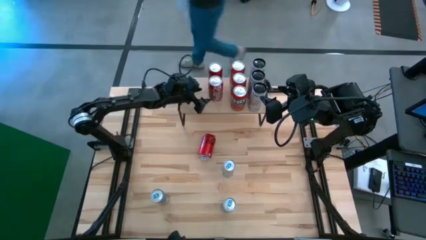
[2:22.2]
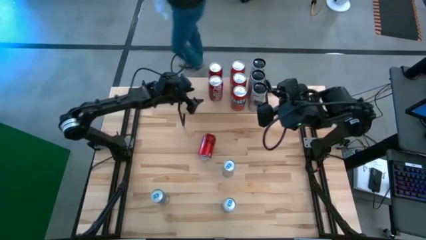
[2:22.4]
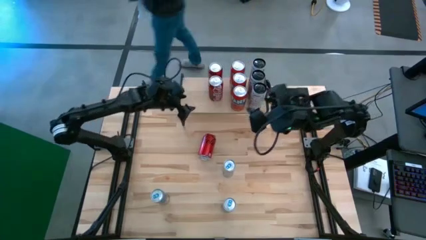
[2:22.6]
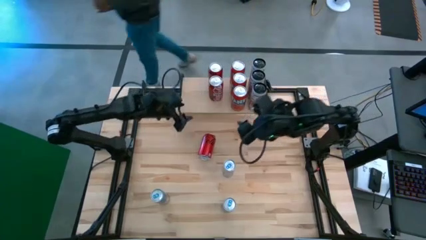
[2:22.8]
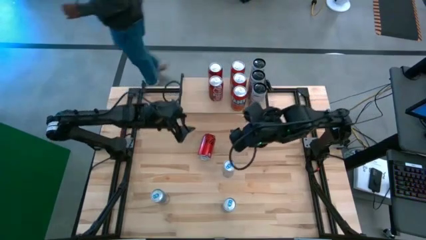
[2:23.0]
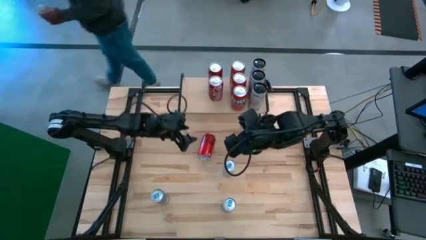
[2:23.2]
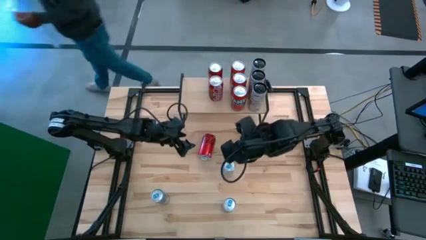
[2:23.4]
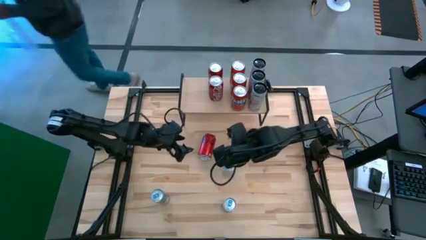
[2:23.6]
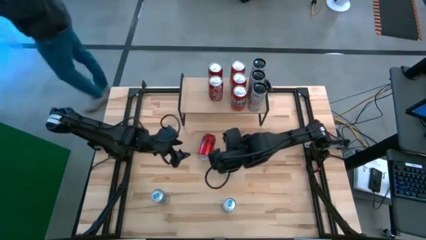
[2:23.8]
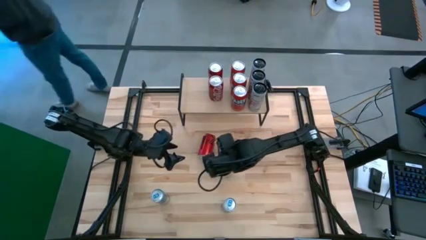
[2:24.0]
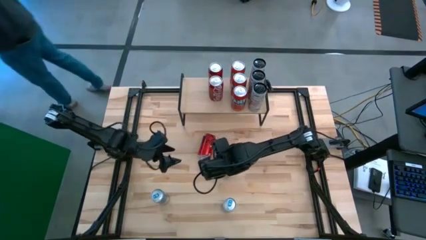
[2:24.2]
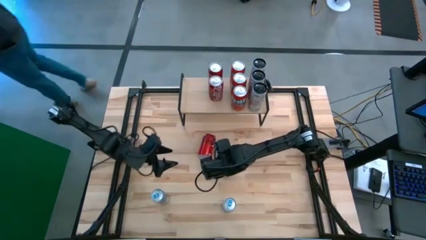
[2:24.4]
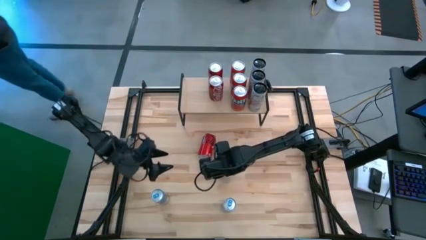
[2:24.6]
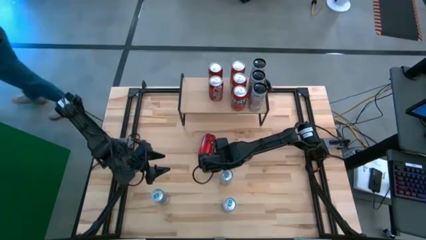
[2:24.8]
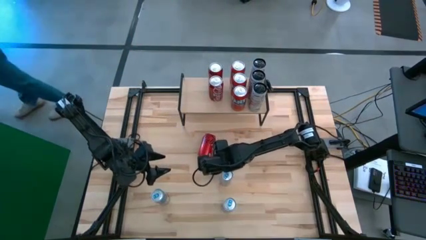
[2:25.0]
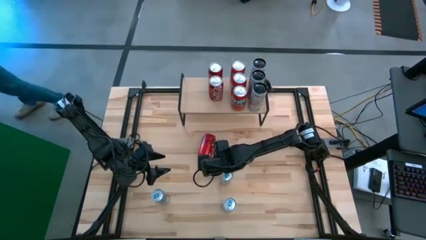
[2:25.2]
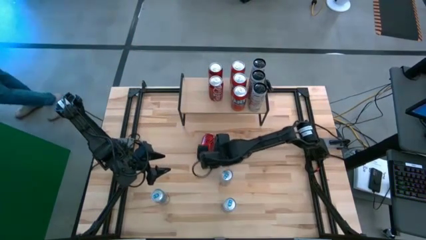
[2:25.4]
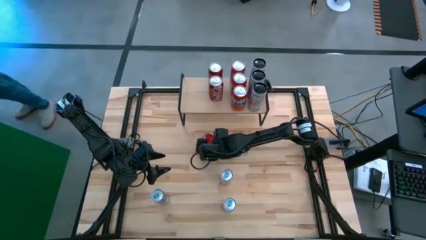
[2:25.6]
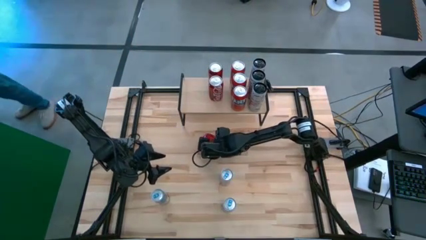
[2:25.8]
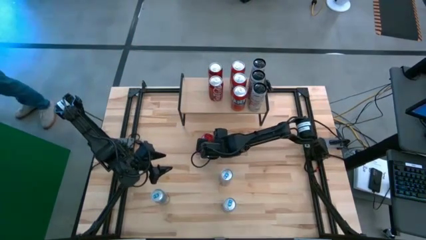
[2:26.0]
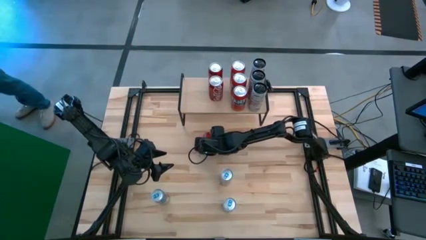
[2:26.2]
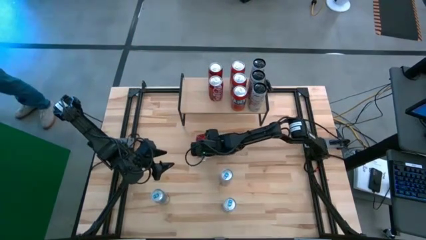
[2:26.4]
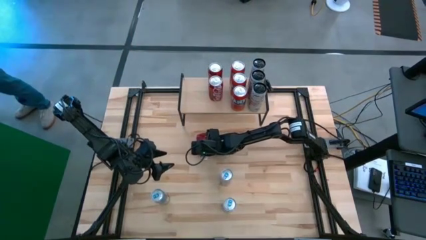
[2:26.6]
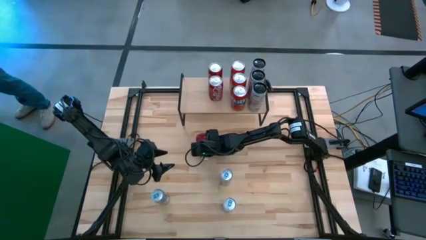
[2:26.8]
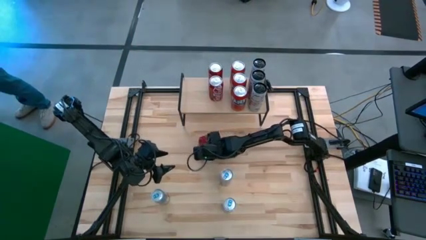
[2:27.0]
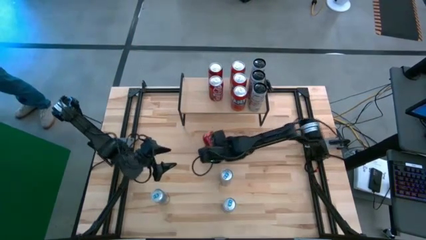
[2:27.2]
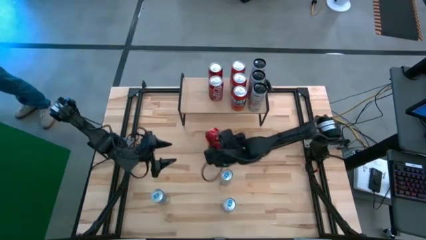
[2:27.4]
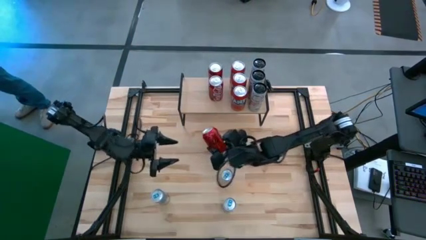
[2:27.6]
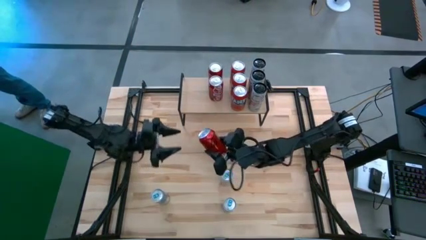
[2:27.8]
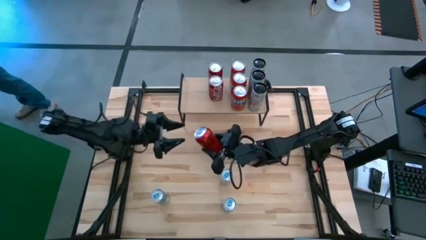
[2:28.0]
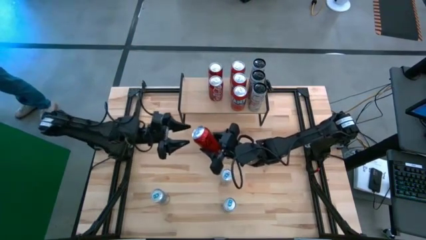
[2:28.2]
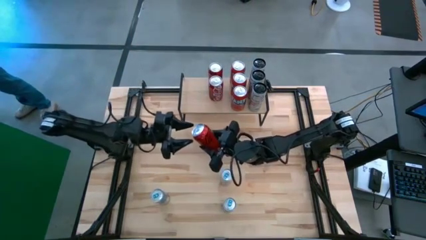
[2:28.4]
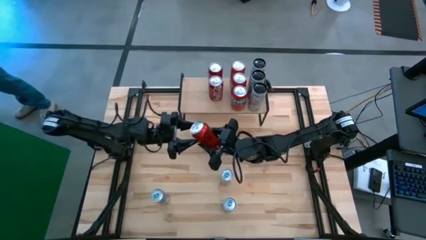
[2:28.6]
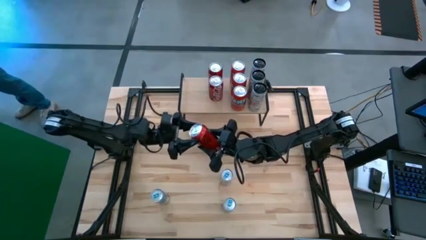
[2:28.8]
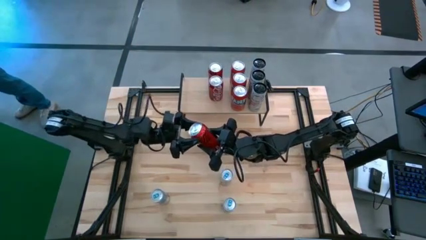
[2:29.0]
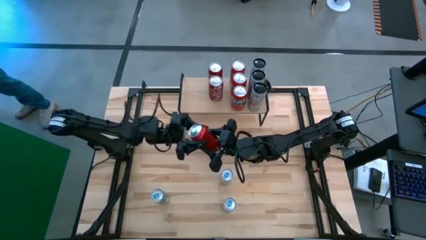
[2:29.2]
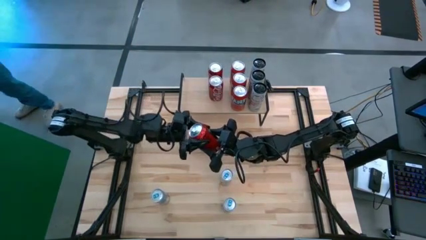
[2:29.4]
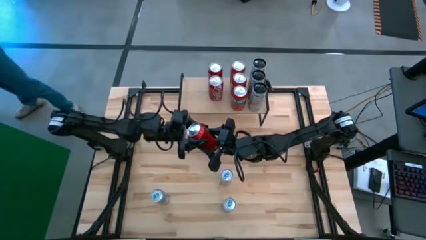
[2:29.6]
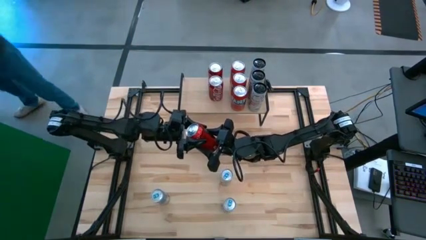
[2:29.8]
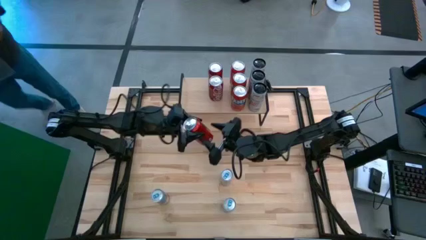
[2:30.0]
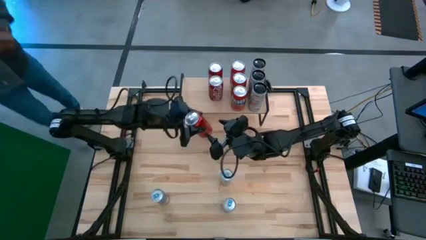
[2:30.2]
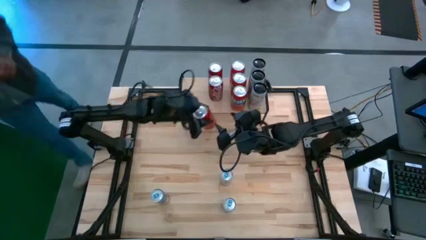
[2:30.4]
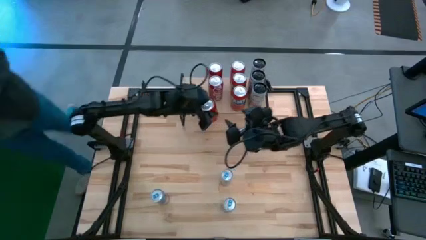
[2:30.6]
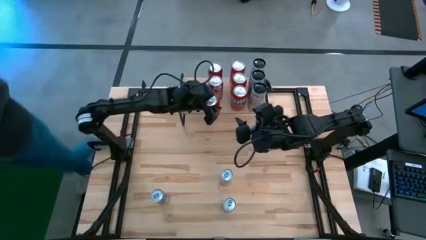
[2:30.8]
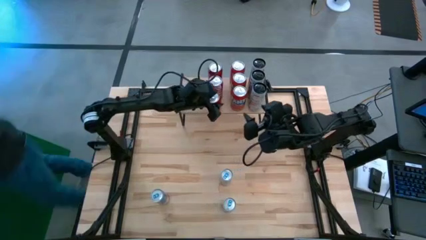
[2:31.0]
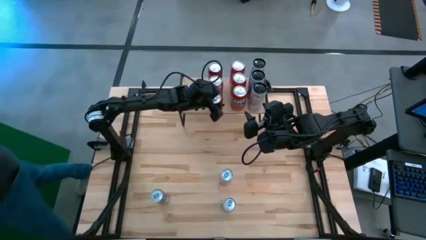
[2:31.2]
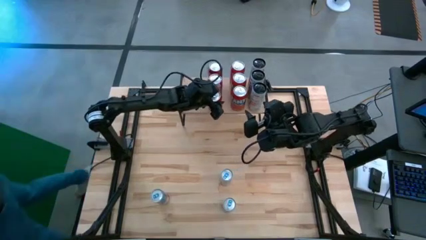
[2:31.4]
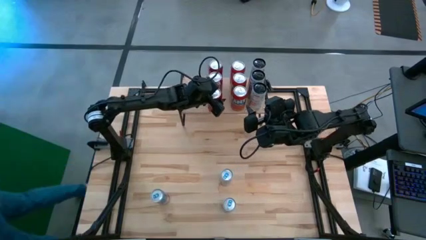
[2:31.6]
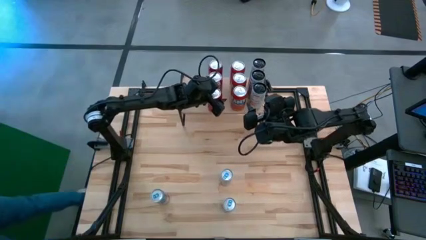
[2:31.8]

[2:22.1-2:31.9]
Task: Place canned beverage on shelf
Put the red black soda can aligned with the other red black and red white soda cans on the shelf

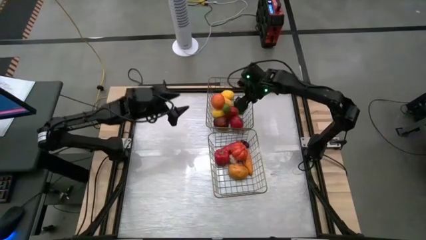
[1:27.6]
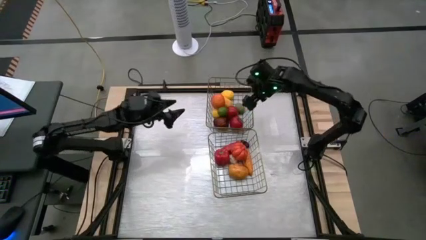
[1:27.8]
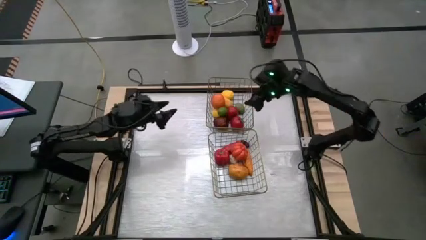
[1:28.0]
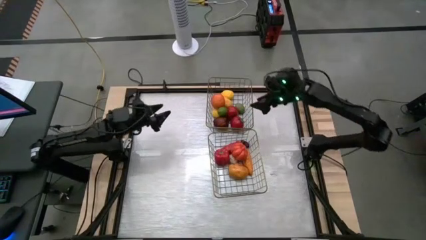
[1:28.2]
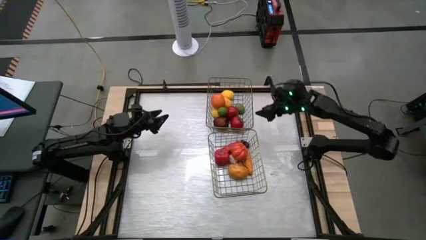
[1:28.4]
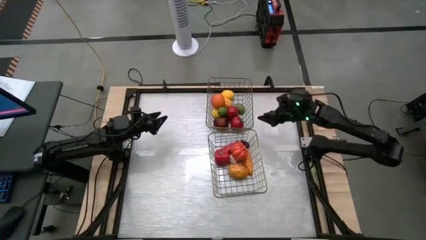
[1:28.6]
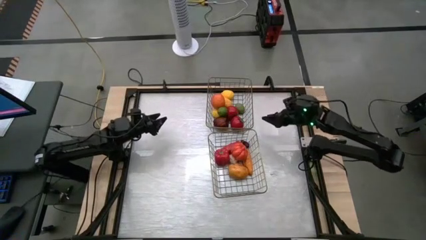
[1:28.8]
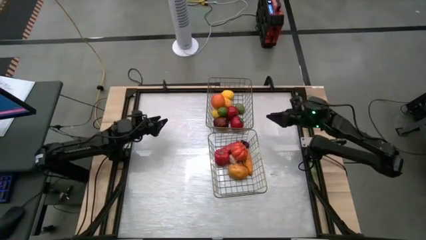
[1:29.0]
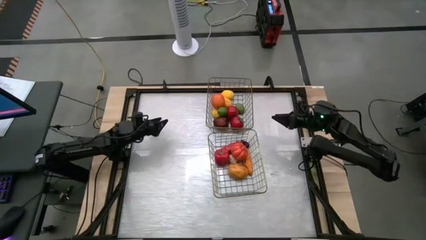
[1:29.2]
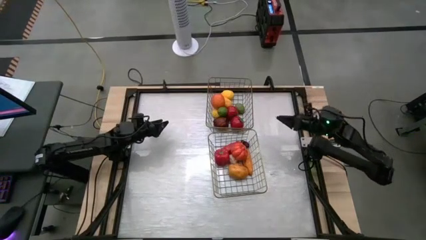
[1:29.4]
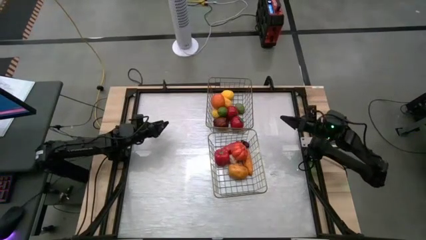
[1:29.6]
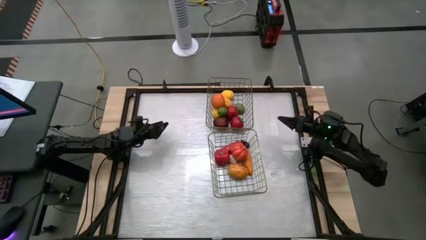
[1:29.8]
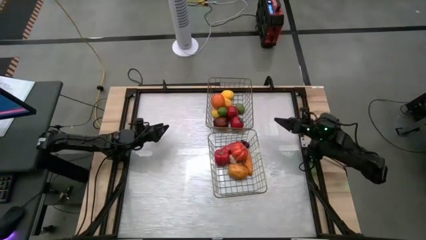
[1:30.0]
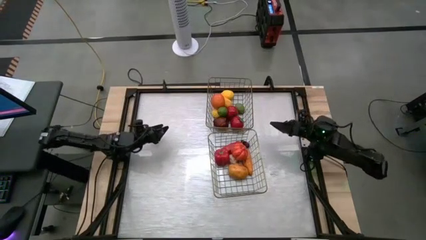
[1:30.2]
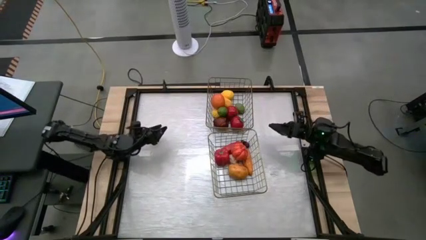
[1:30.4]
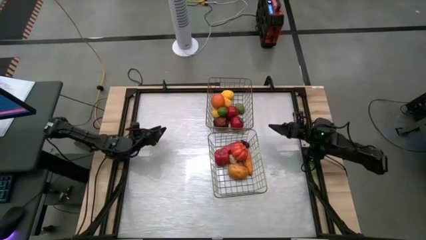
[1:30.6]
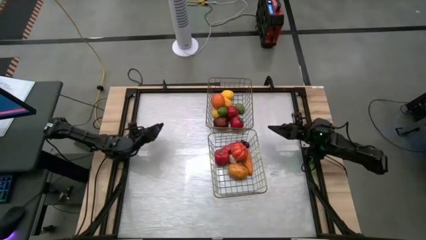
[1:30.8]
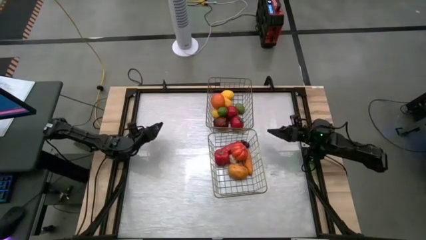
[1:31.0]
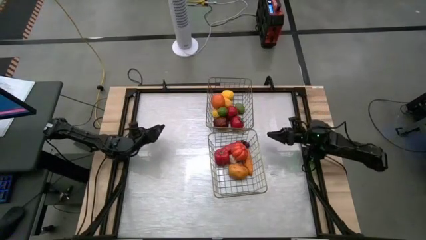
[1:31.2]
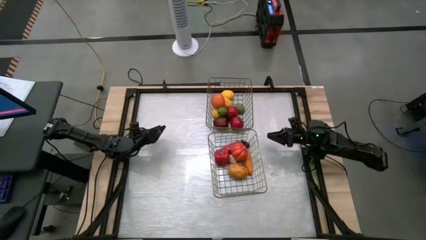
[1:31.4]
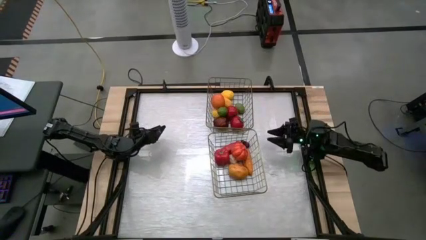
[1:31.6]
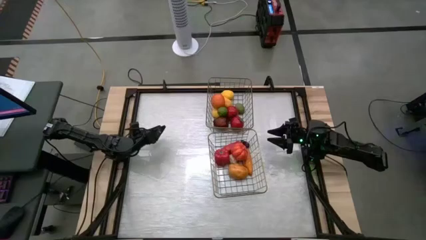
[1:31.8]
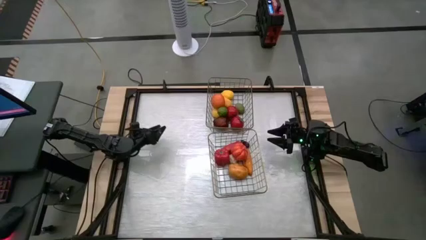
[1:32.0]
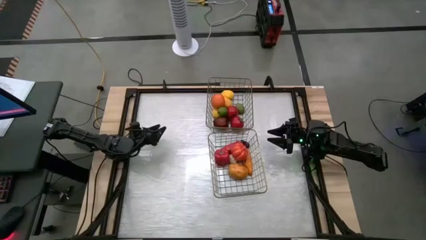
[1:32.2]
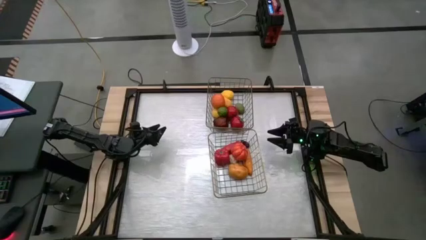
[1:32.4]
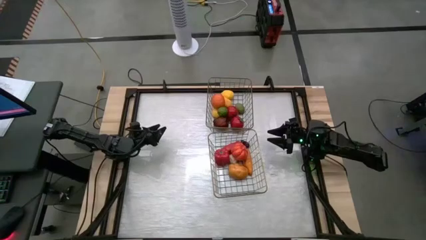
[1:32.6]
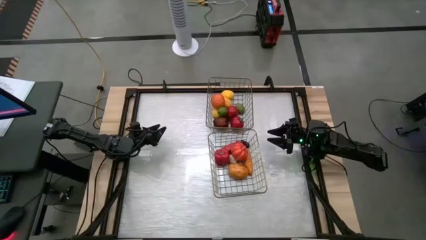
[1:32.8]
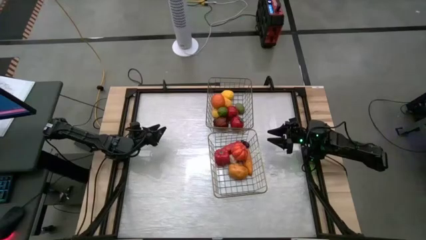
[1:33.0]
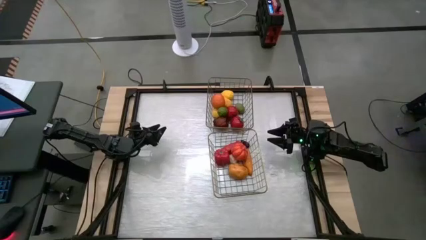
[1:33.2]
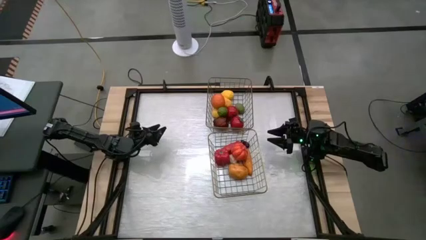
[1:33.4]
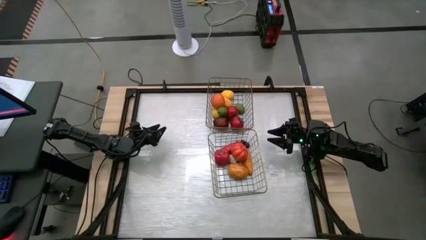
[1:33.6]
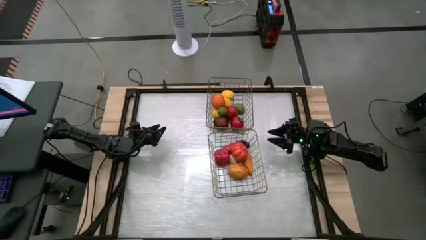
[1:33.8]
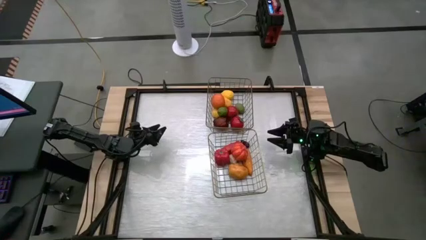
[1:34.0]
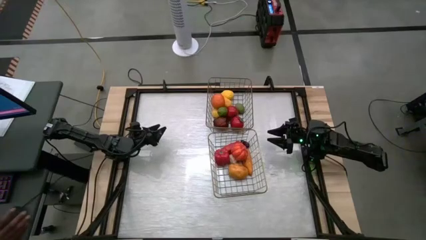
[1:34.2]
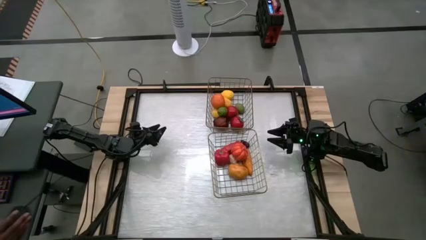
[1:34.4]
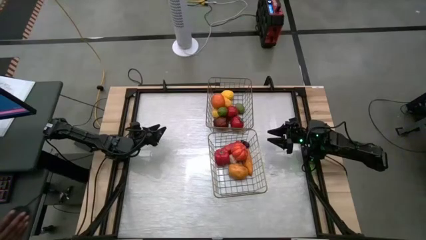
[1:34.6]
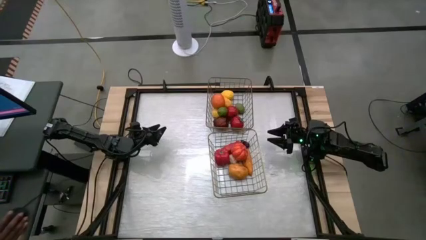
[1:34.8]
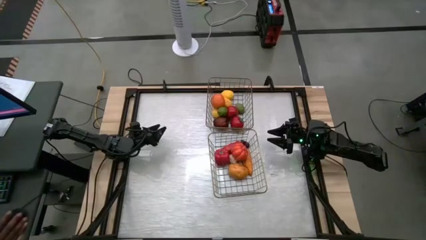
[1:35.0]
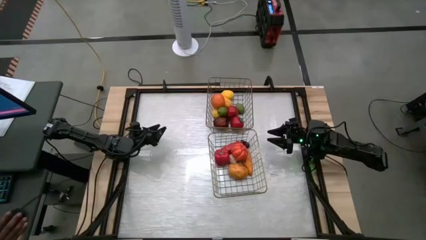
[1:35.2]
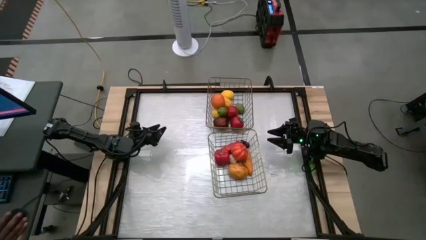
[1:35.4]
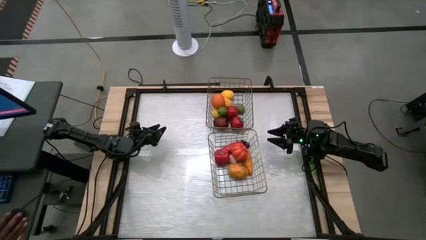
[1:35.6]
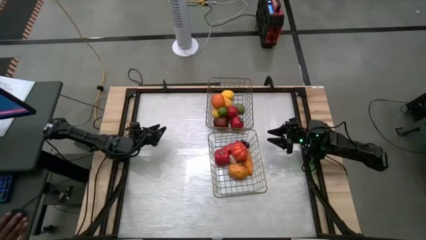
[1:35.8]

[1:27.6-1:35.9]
Task: Sort produce into baskets
Return to Home Position
